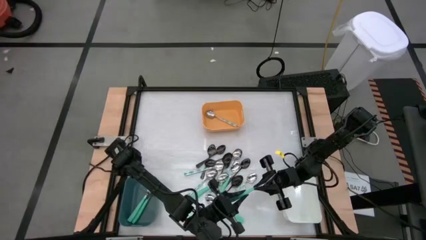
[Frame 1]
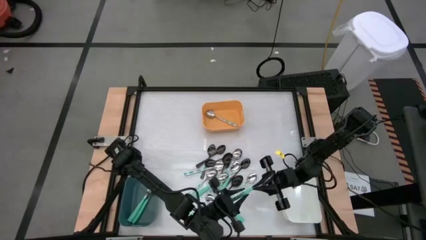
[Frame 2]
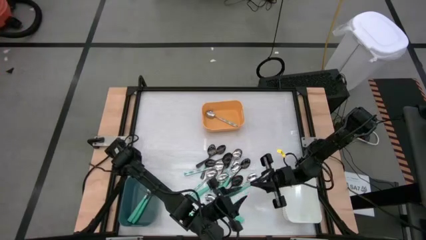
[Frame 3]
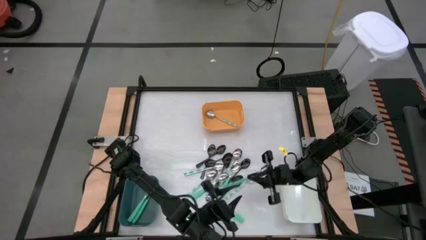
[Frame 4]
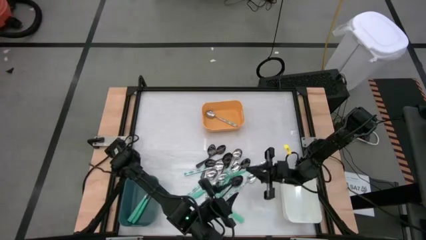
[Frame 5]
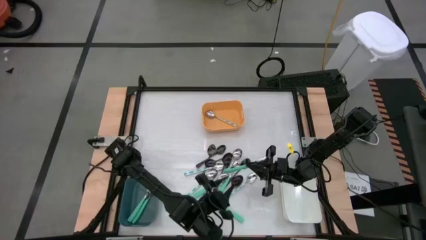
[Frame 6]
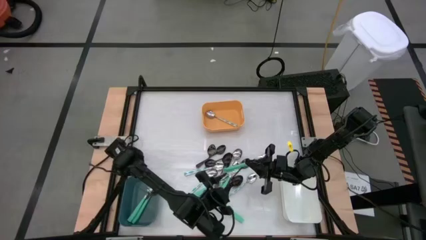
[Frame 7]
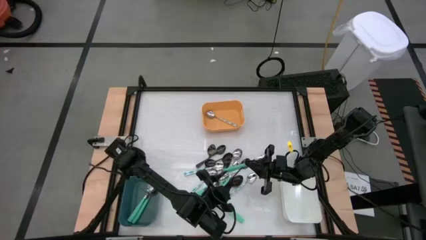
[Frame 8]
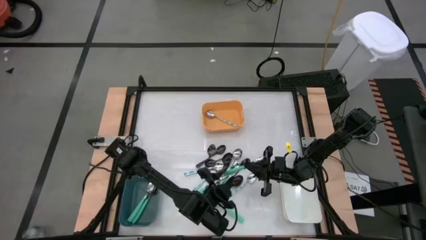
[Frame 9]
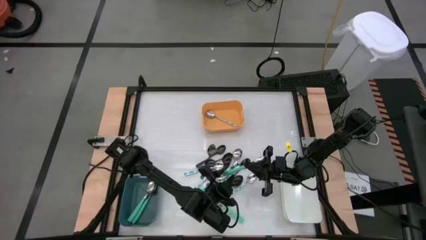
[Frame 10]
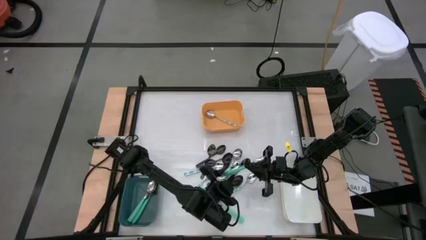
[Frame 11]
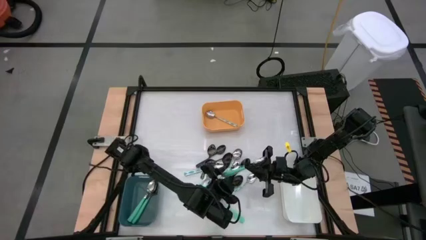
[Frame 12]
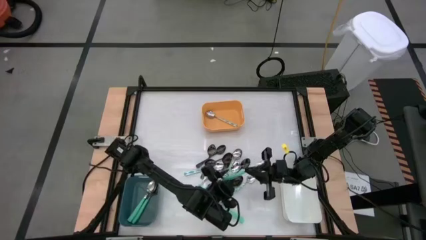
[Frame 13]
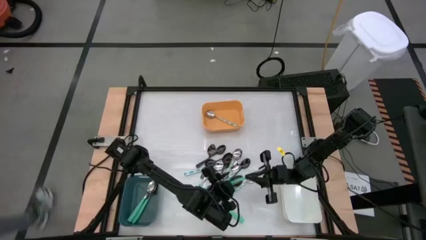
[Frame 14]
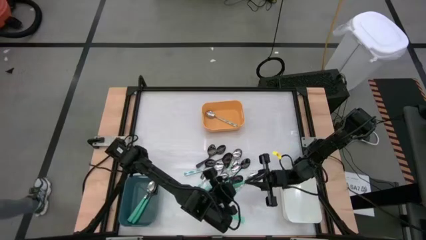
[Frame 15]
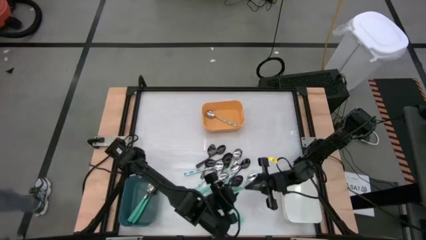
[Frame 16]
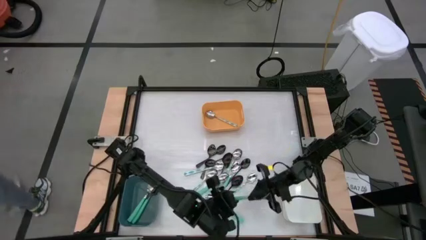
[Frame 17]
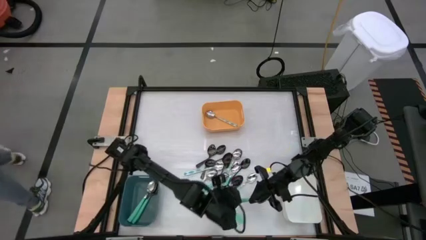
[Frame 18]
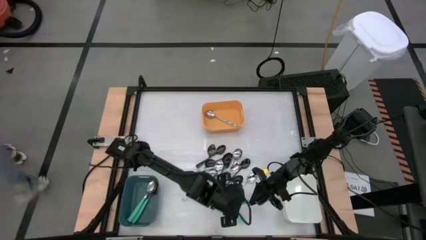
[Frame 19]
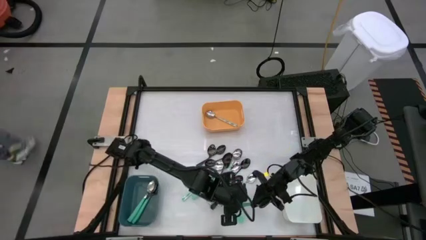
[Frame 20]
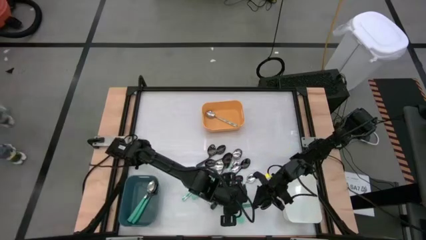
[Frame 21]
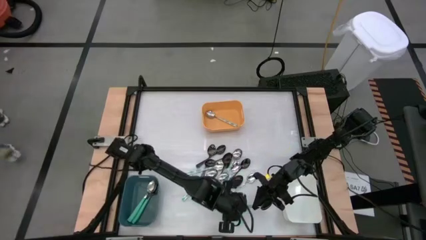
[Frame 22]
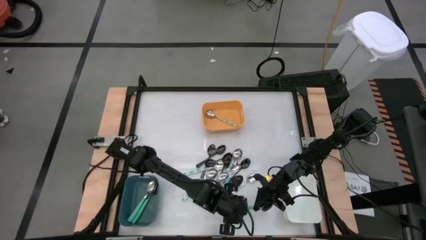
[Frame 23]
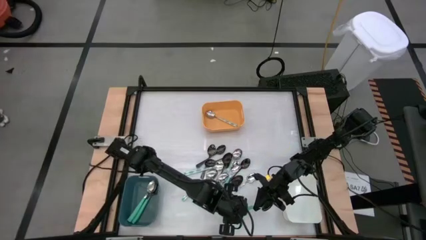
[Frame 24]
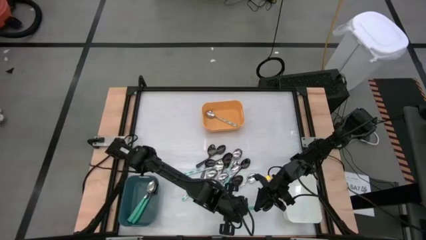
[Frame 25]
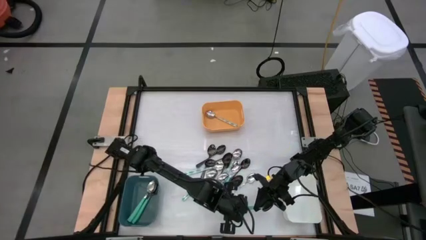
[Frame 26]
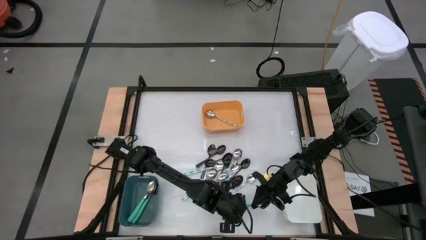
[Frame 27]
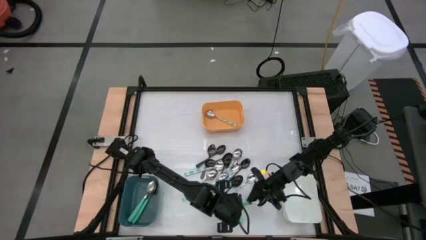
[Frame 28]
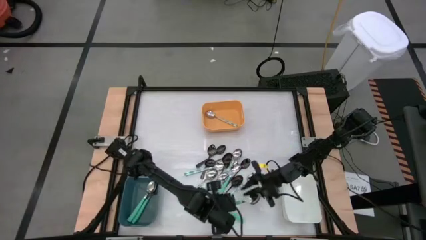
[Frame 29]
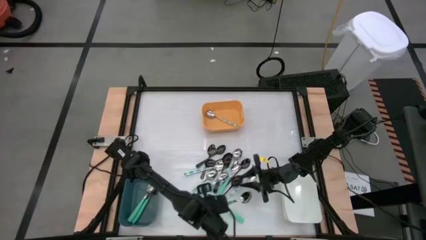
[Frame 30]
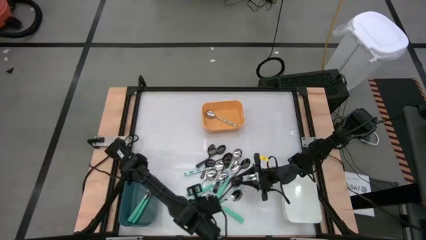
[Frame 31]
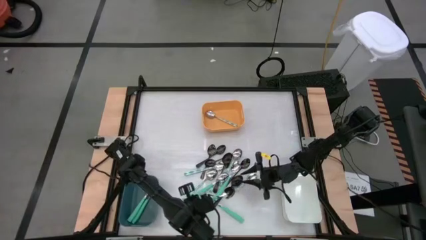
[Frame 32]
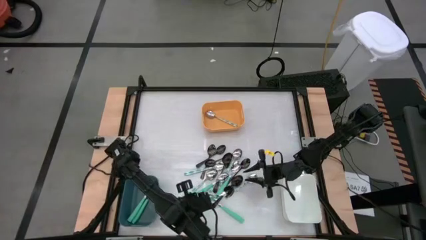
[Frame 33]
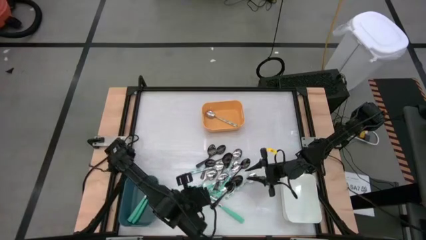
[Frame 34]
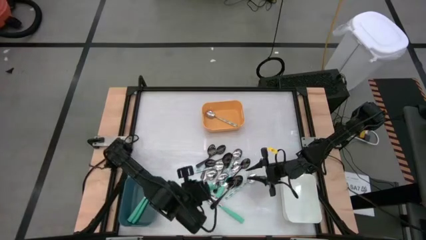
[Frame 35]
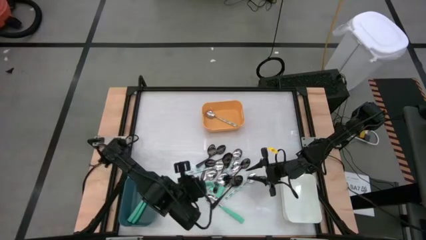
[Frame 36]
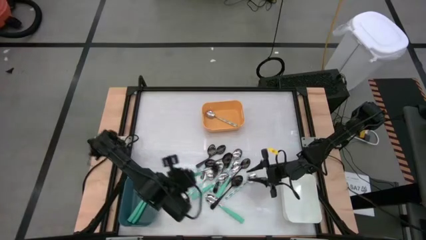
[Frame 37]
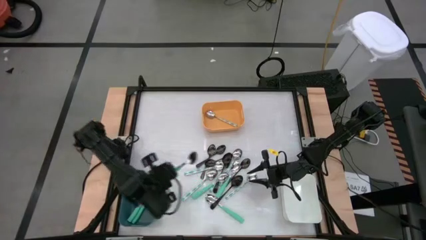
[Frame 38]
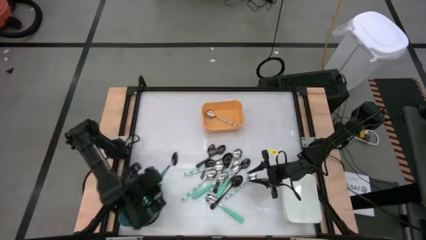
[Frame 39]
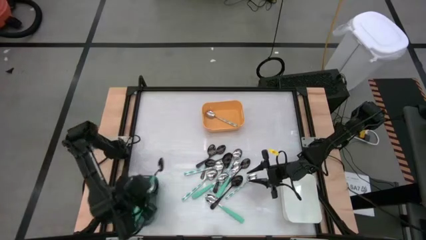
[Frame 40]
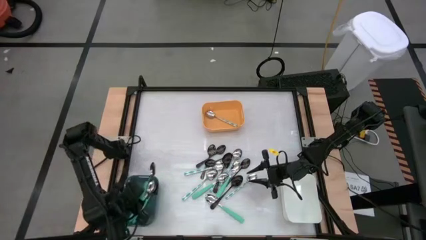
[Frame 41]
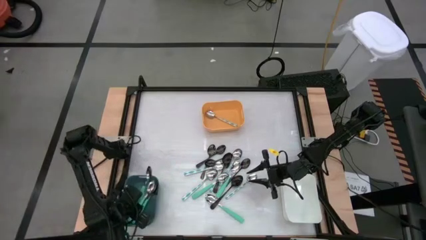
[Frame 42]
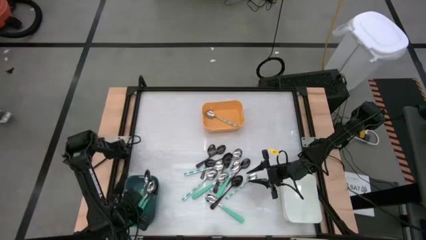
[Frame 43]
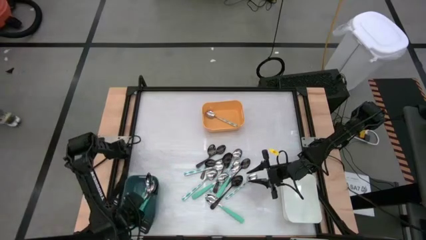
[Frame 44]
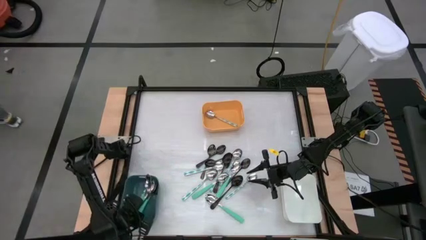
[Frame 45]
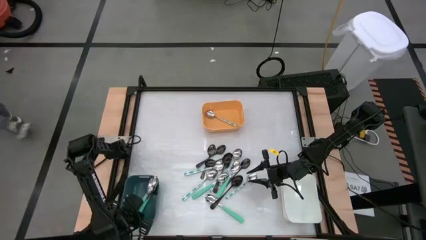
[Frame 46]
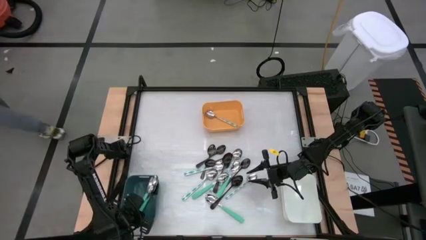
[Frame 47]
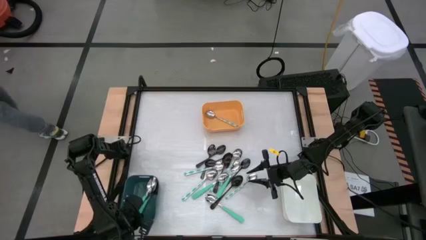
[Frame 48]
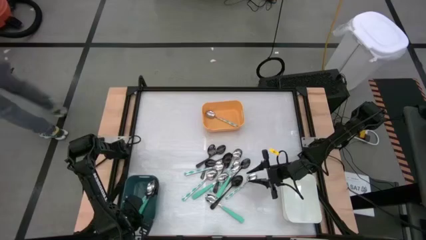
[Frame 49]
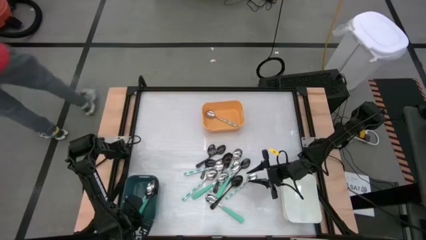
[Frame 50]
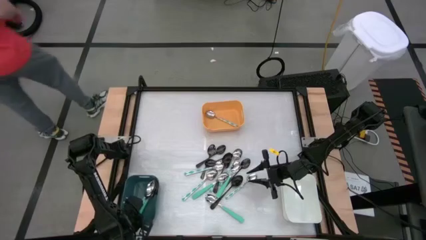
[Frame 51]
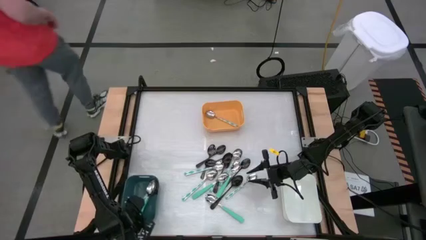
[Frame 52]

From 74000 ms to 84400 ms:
Task: Sort silverware by color (type)
Put the green spoon into the blue bin

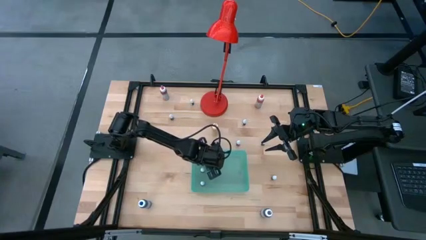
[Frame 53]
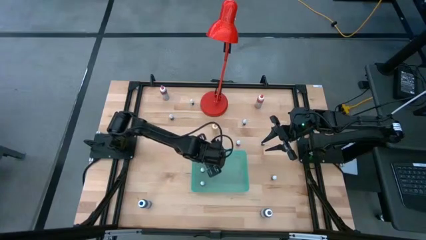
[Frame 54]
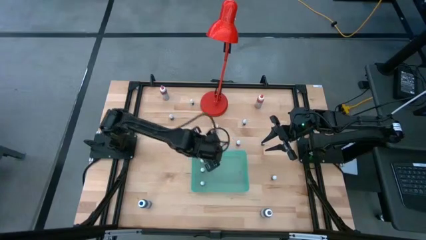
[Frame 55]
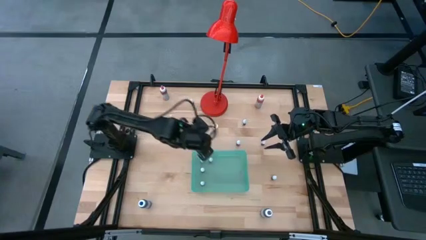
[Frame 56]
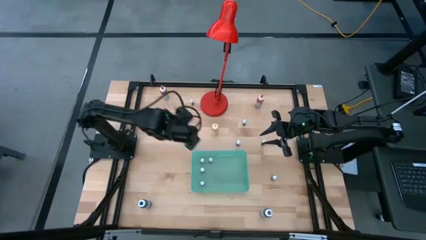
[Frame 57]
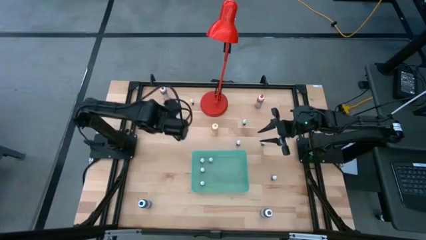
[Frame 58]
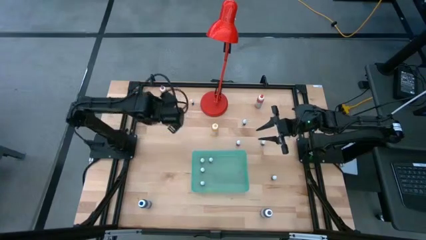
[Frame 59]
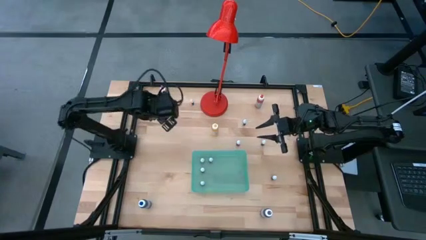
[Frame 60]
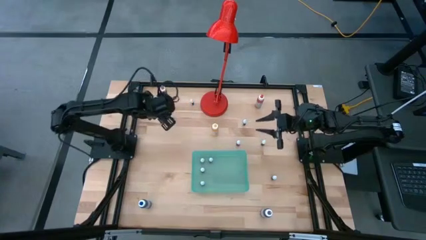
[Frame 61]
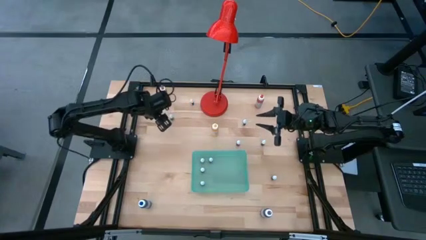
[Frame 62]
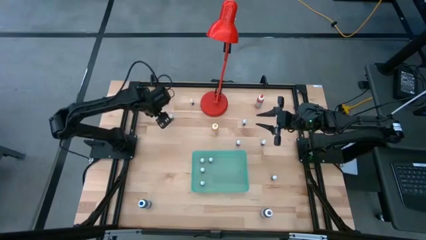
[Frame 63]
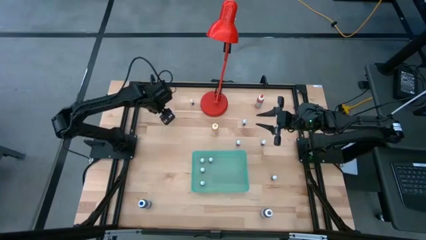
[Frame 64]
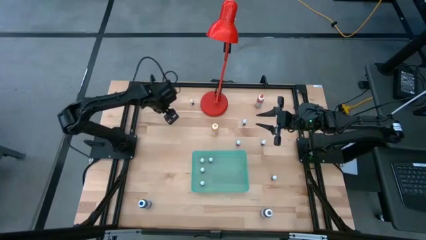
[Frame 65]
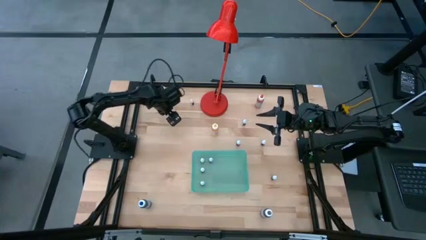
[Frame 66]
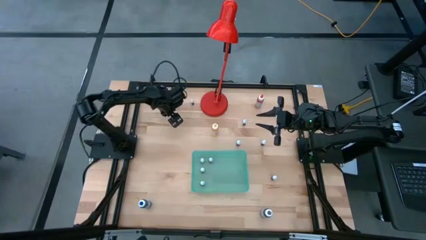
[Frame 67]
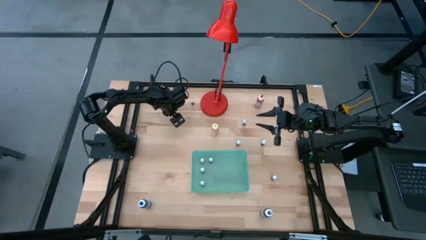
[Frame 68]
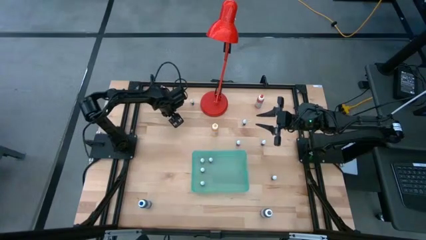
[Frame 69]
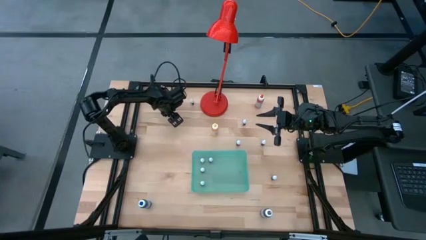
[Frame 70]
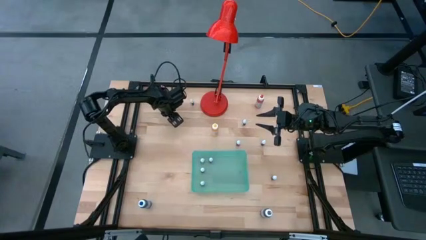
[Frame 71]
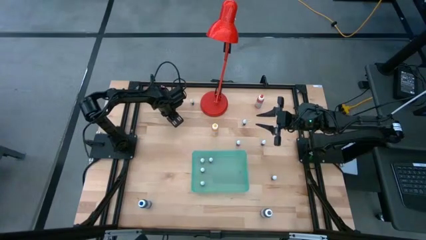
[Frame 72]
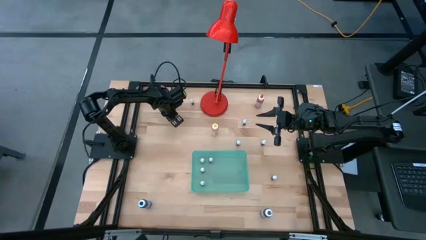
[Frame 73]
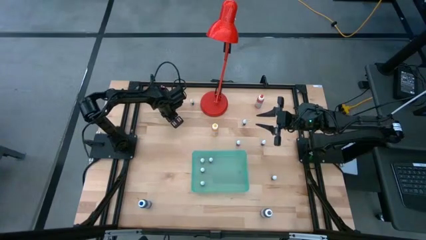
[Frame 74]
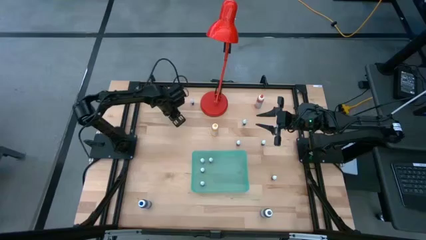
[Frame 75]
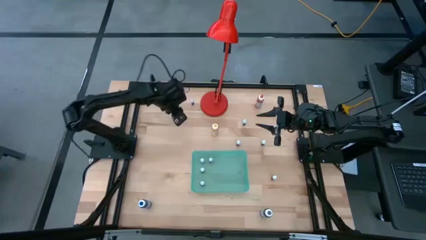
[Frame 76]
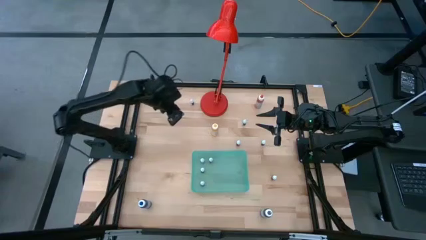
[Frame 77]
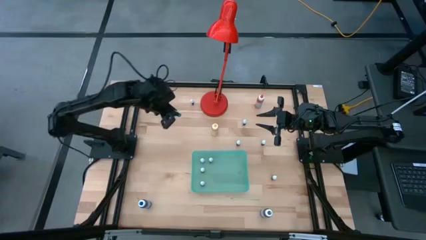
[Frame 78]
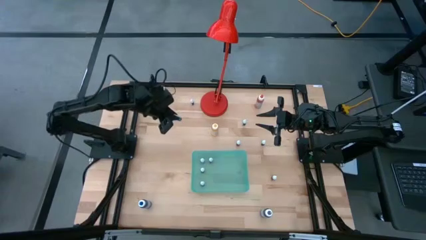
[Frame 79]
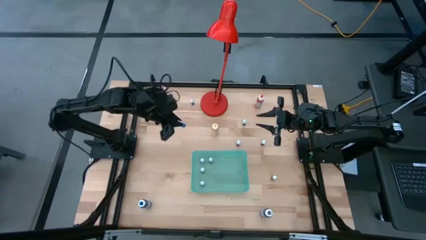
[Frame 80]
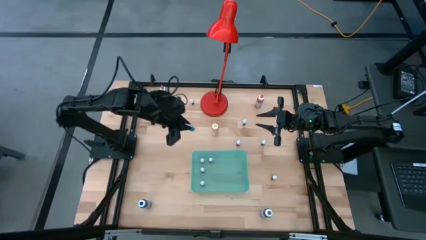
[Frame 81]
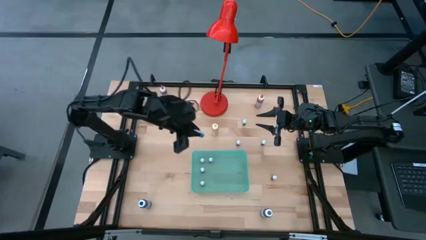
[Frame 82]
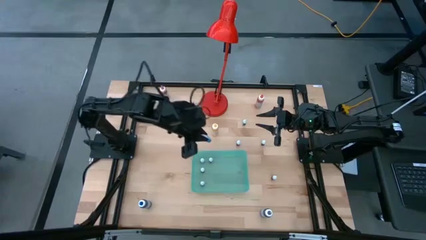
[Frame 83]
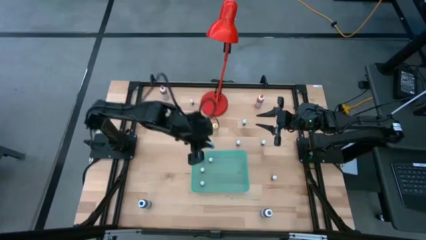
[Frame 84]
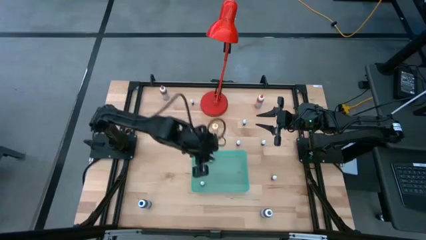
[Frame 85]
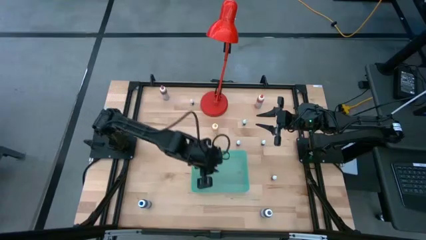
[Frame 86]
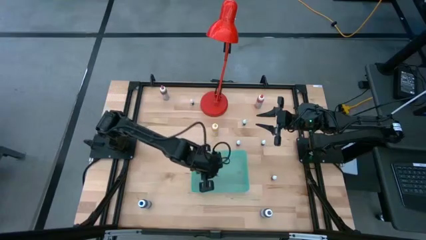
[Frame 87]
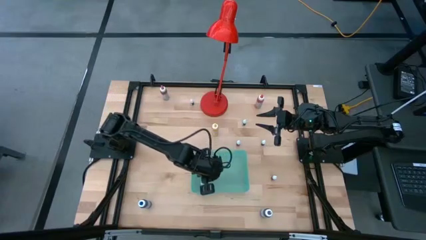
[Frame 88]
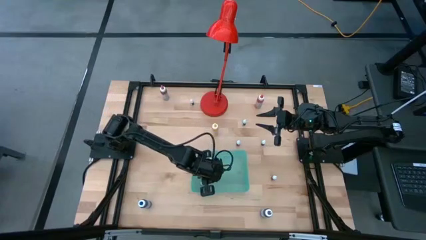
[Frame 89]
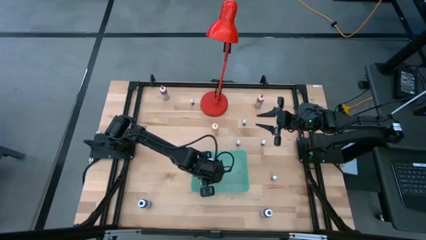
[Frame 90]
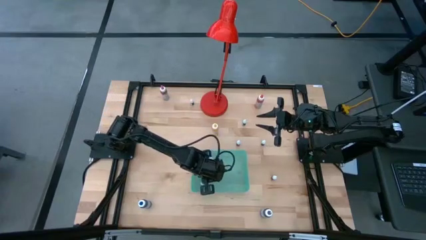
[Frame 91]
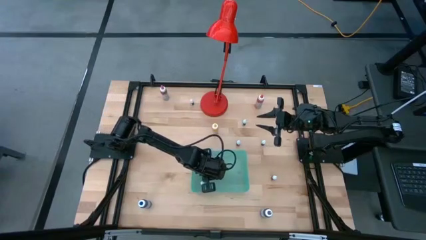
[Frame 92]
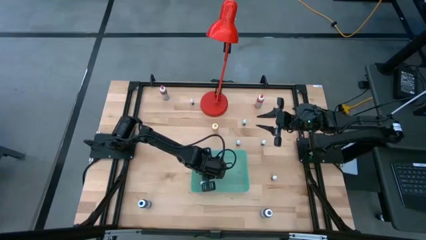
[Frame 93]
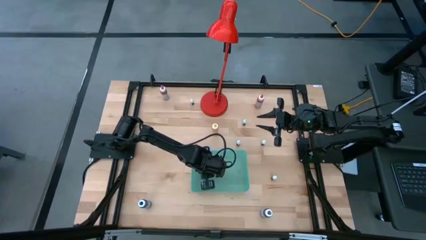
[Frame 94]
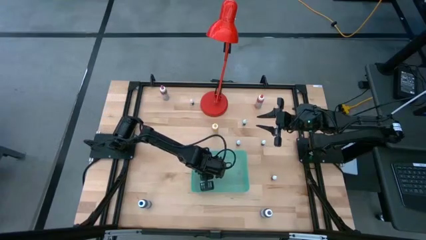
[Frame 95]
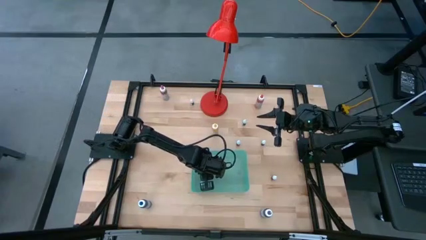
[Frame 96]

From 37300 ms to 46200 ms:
Task: Pick & Place food coloring
Put the small blue food coloring bottle into the blue bin
